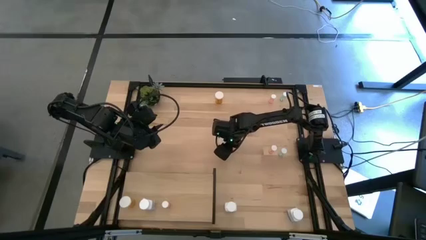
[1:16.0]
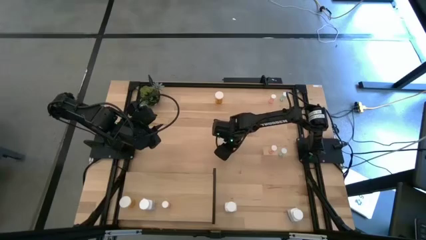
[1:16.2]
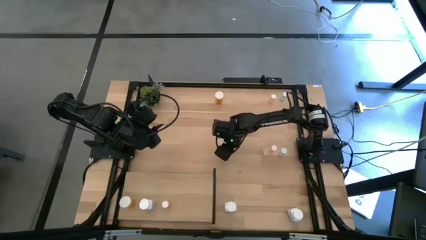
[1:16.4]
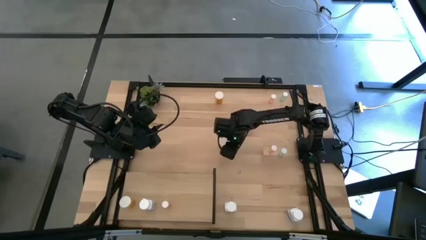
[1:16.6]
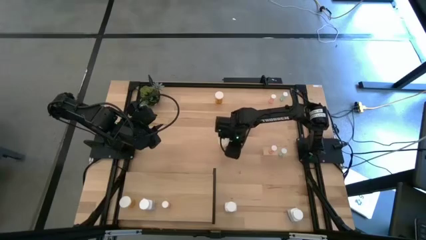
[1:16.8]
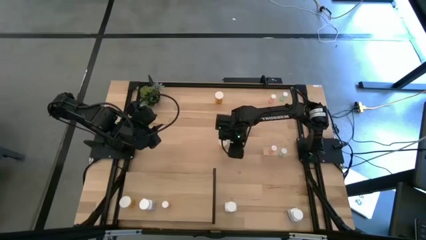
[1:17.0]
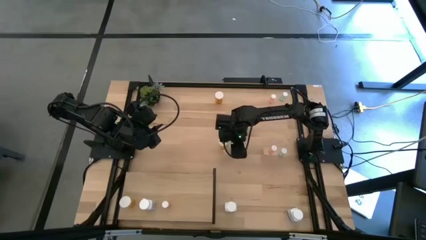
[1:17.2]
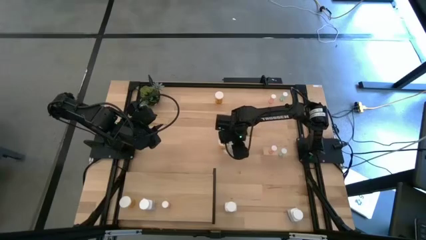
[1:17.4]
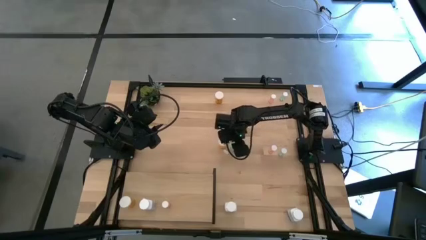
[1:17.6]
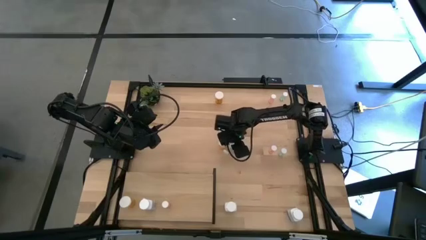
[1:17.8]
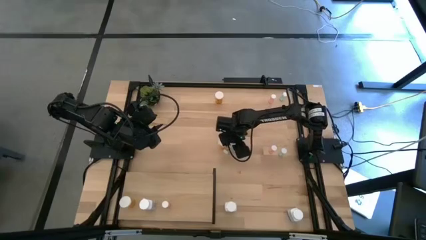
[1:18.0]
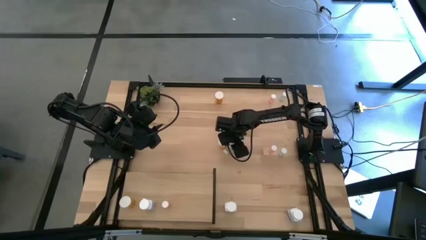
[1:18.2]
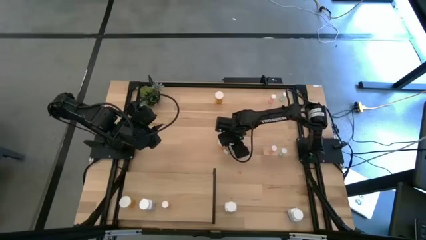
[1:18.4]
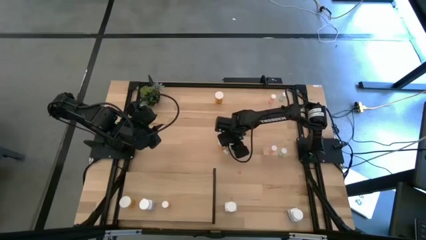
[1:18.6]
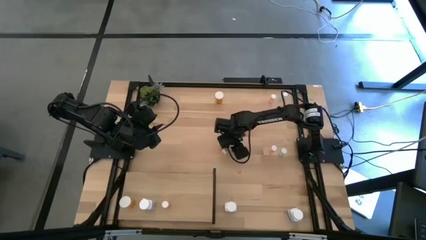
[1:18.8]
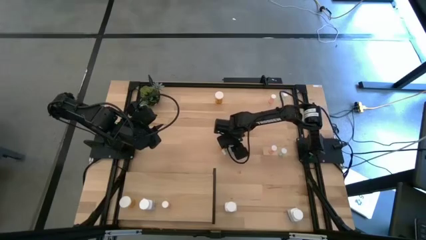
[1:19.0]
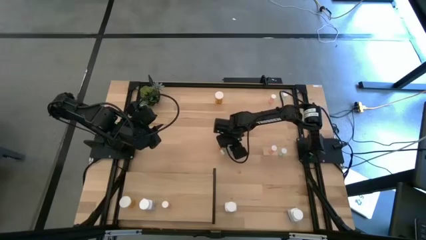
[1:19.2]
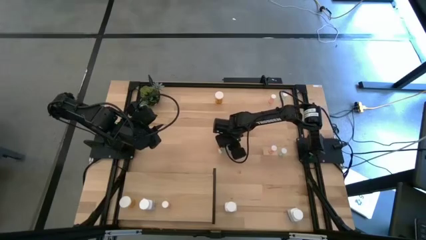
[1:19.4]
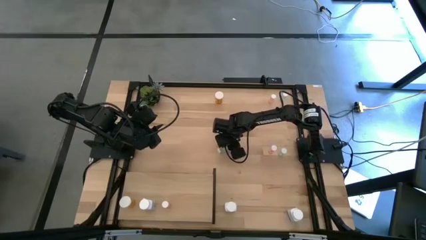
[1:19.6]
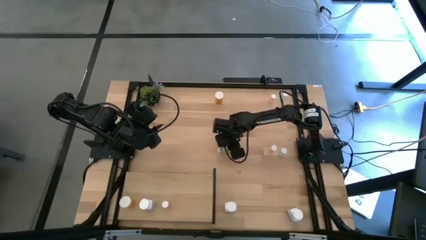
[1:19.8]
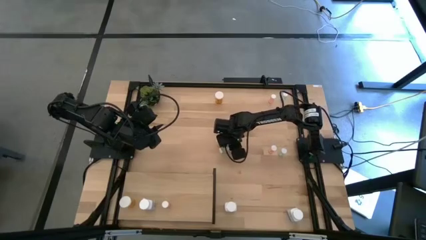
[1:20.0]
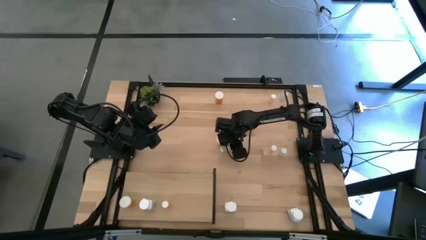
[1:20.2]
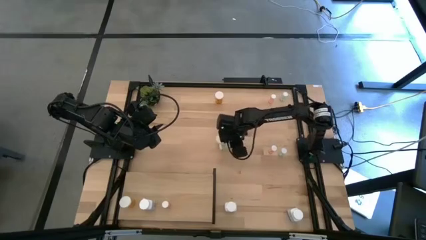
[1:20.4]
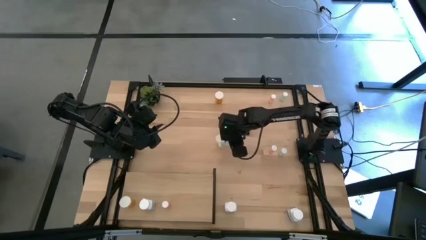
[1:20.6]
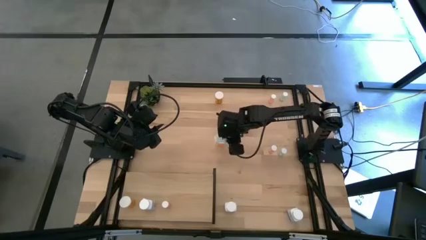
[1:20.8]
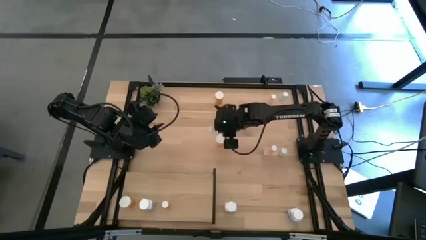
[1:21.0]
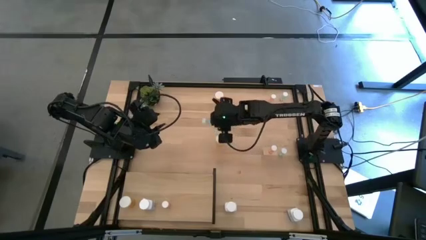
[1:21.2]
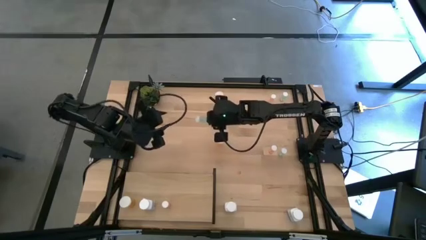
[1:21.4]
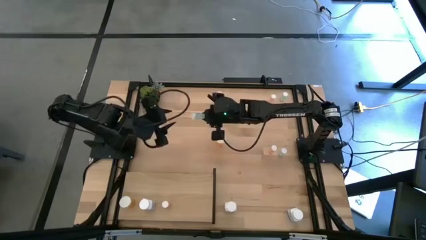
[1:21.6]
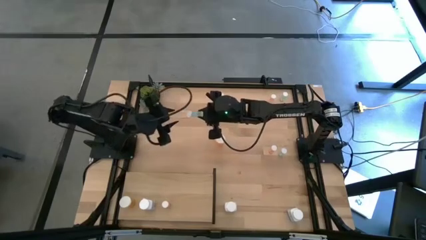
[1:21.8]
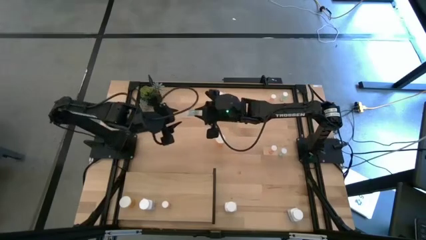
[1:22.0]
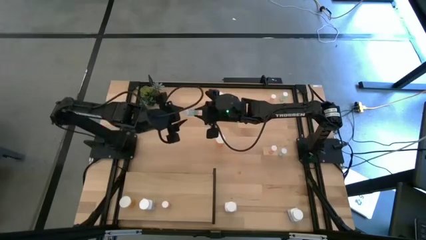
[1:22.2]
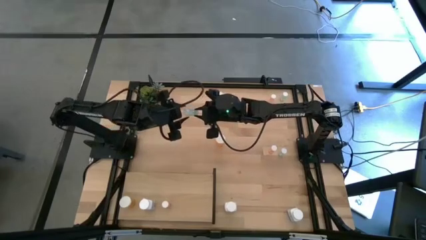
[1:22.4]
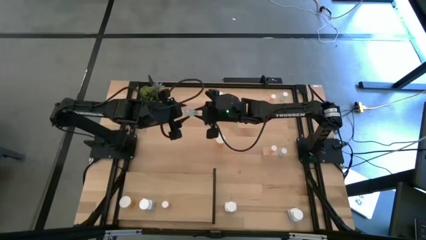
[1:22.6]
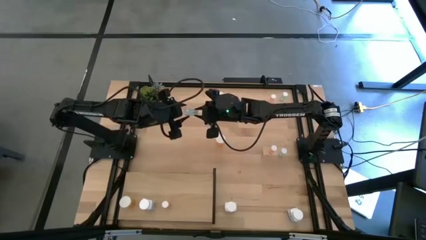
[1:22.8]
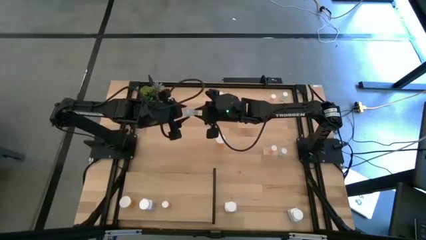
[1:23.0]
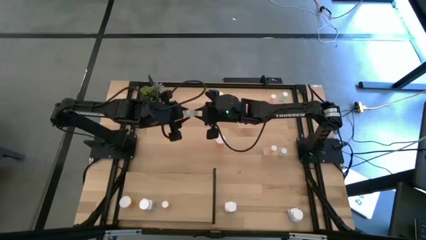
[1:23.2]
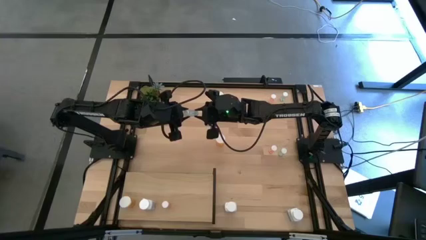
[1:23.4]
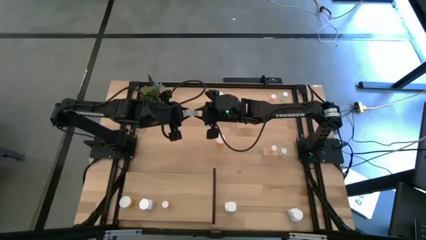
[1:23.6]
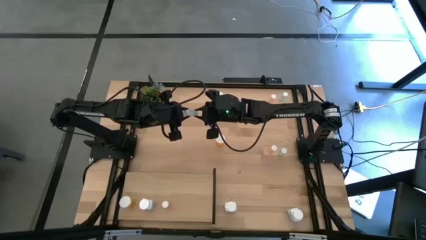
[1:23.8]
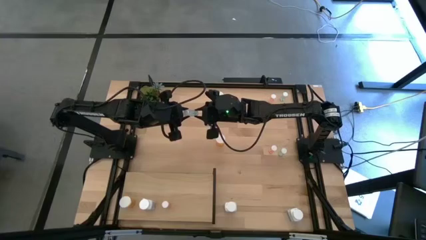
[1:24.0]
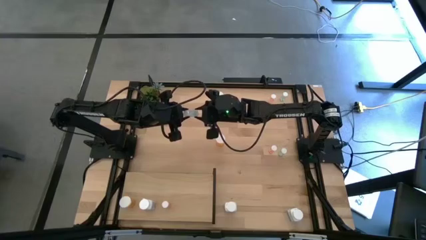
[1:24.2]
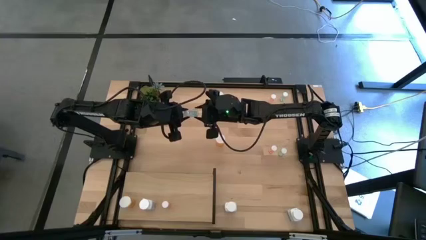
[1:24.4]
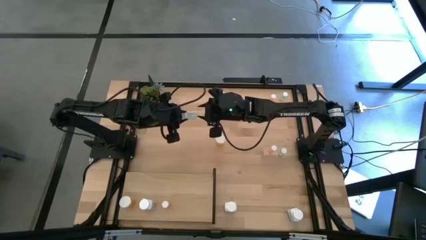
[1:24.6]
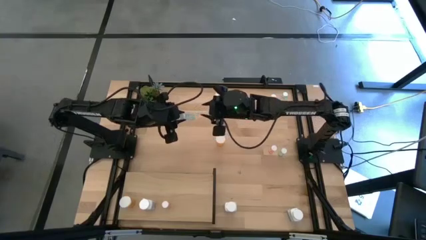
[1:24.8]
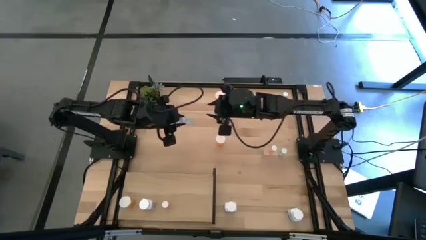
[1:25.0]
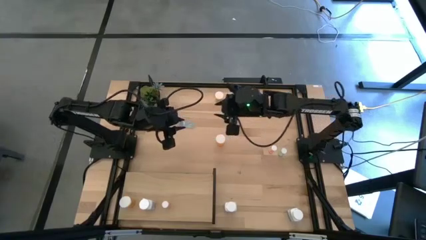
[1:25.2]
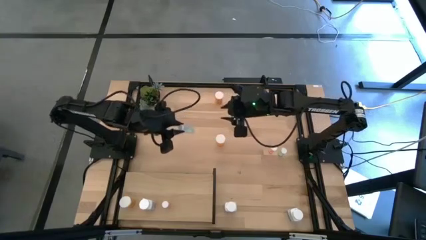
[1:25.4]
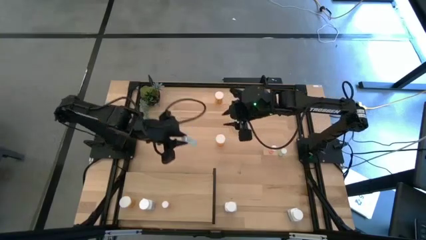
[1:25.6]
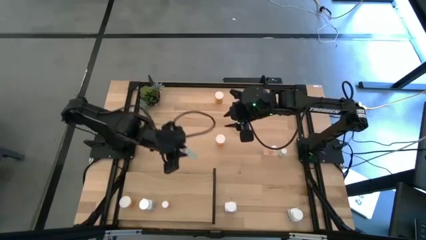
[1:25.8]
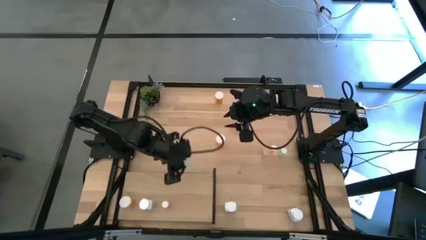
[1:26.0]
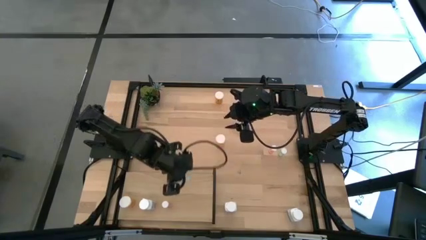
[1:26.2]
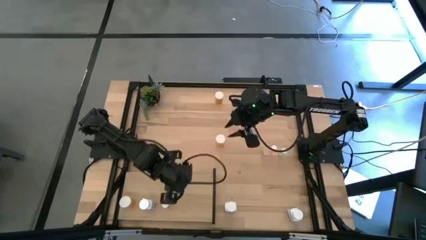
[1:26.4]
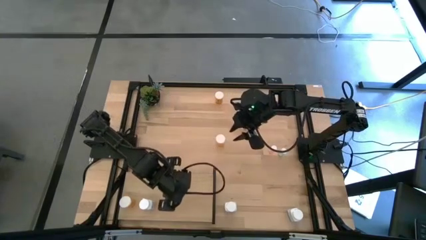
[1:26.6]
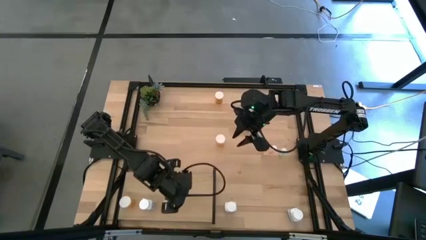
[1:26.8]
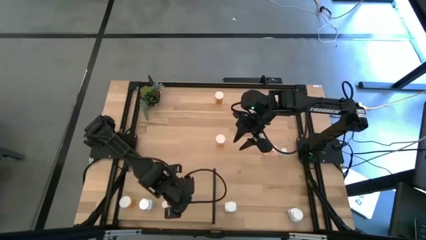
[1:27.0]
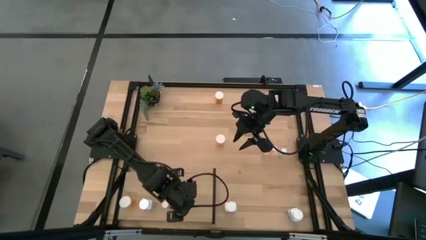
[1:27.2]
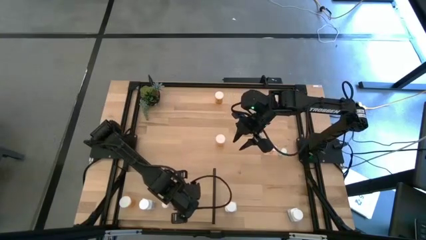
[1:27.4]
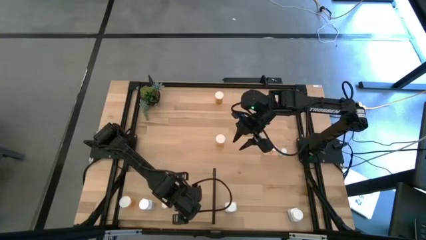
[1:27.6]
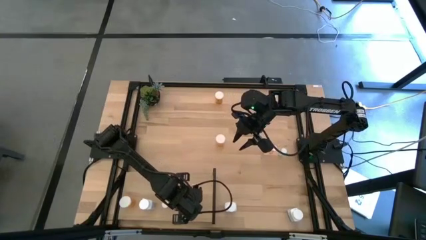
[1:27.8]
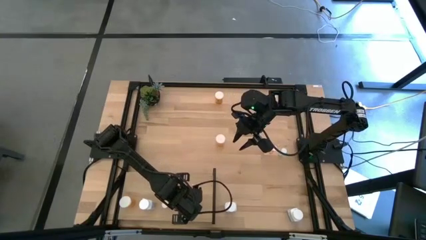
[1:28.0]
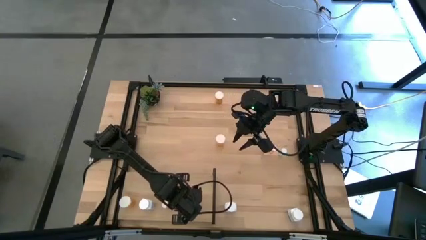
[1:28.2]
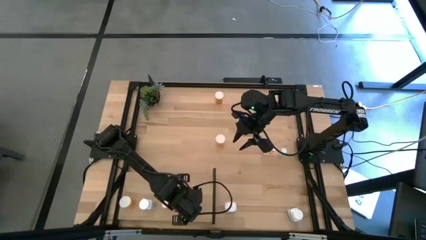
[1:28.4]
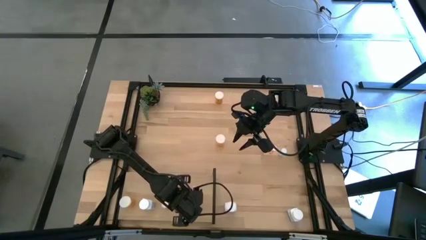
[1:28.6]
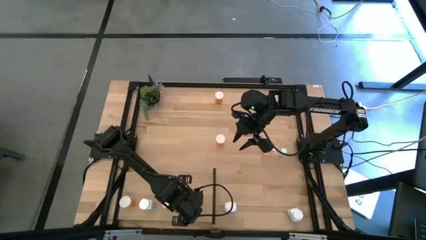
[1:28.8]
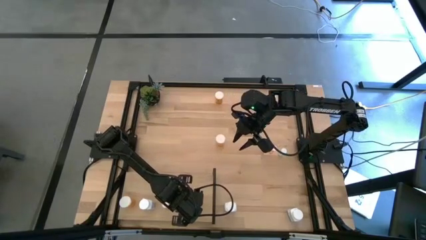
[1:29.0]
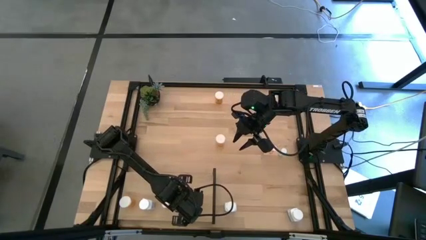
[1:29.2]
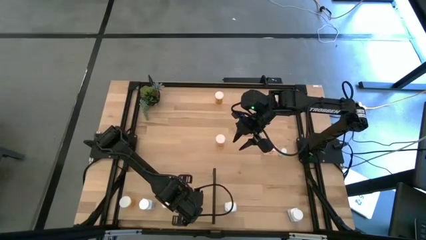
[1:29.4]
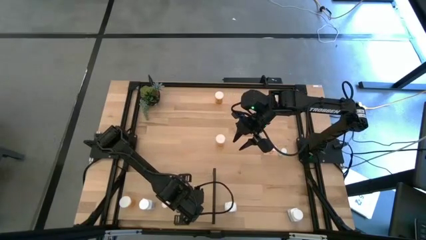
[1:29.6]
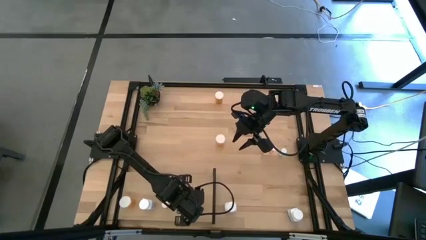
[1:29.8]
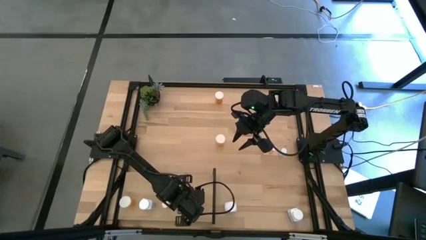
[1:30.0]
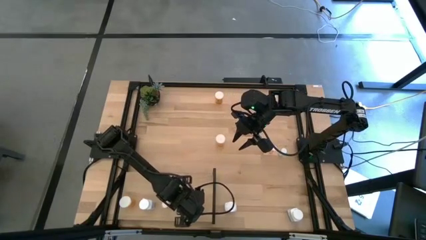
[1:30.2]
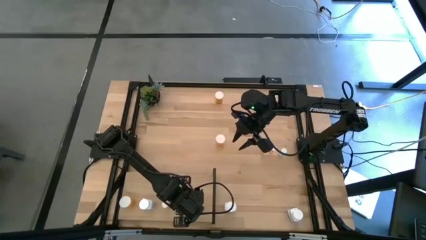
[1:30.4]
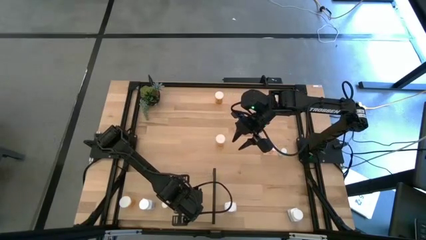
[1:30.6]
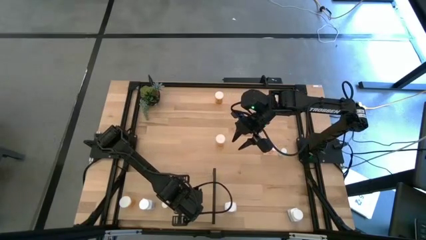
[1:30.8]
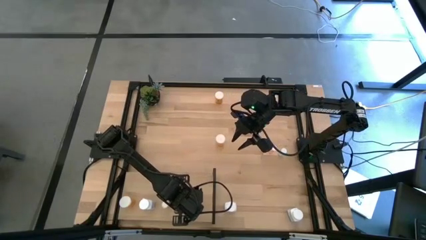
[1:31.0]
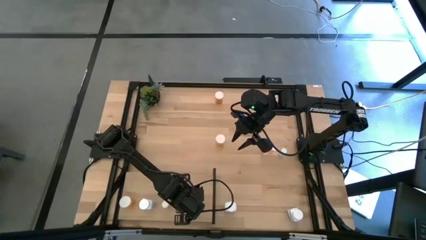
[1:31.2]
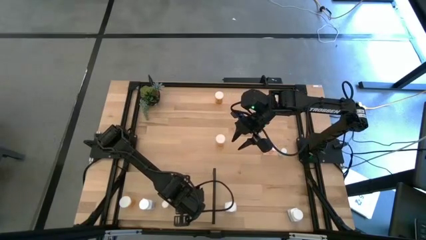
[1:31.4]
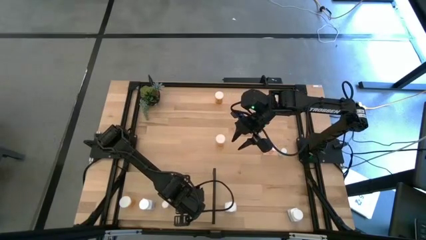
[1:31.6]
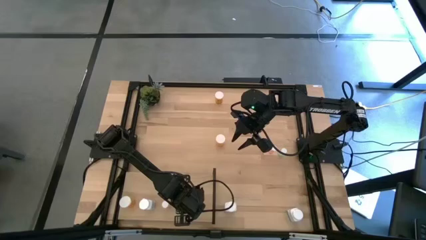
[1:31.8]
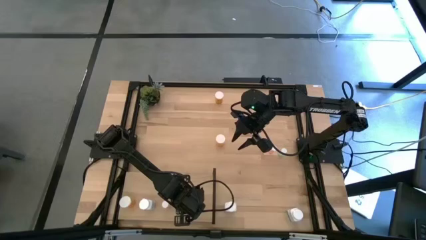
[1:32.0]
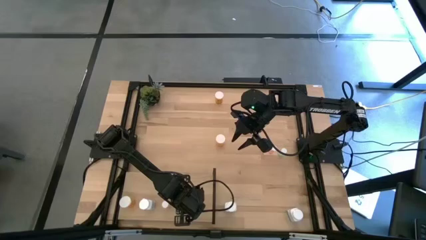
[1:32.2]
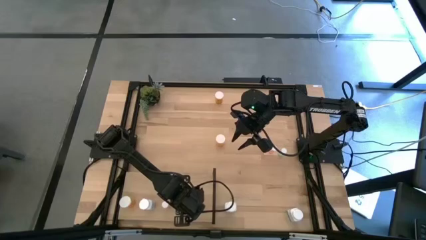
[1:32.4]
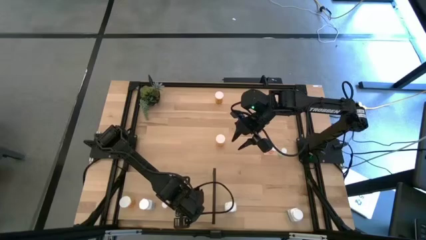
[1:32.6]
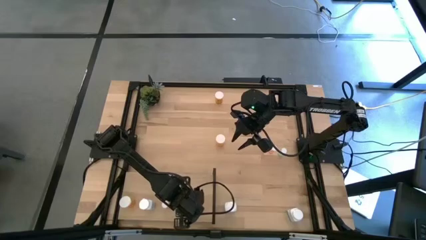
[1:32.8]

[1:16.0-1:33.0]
Task: Pick and place medicine bottles onto shelf by color
Put the bottom left small blue pill bottle on the shelf
